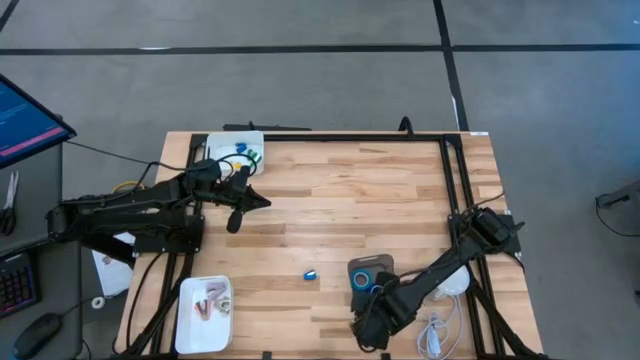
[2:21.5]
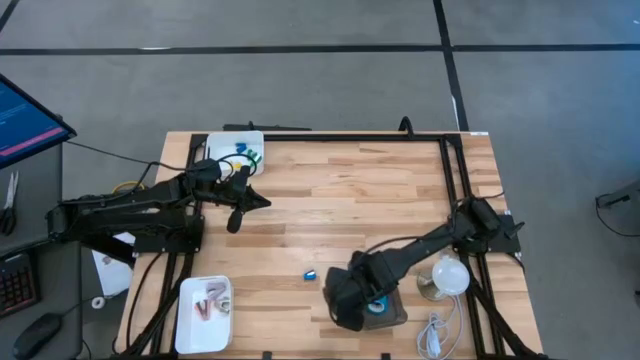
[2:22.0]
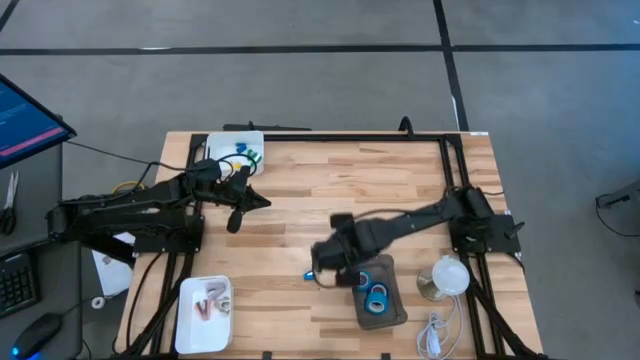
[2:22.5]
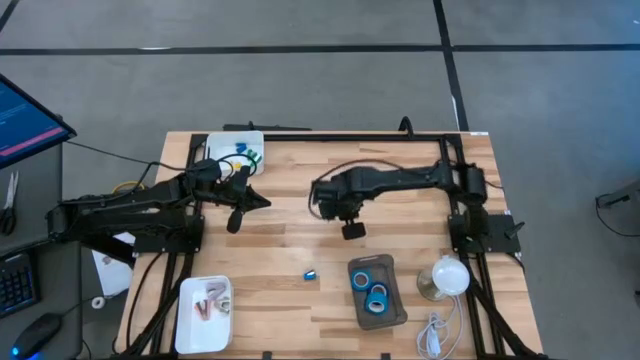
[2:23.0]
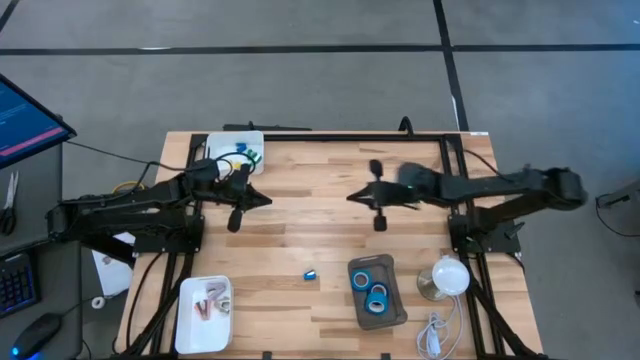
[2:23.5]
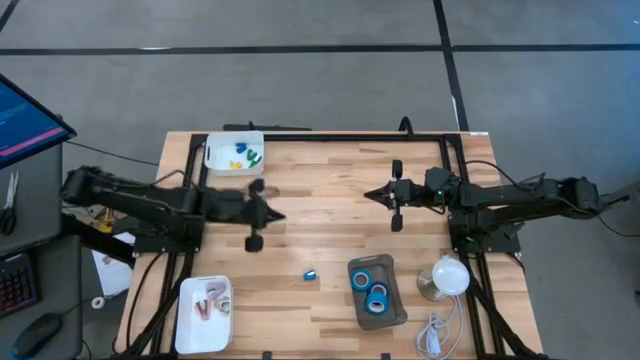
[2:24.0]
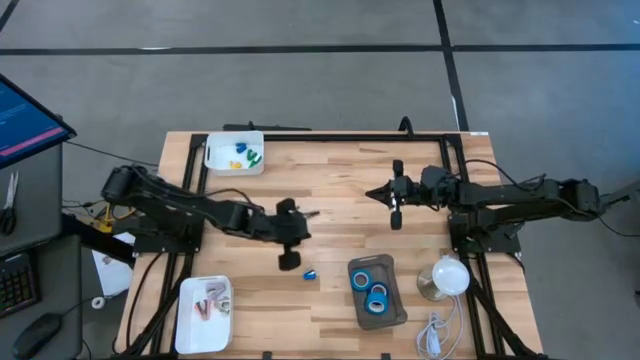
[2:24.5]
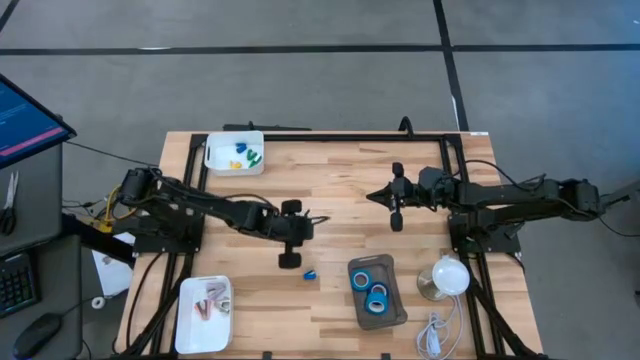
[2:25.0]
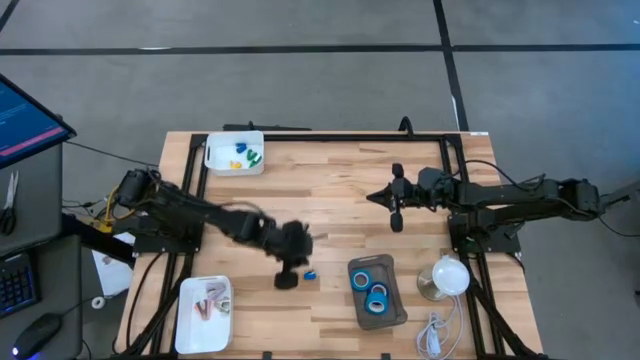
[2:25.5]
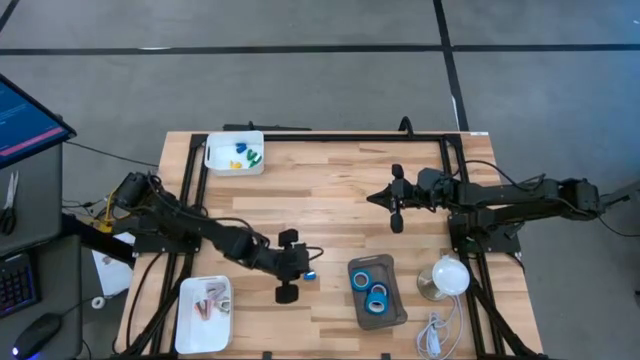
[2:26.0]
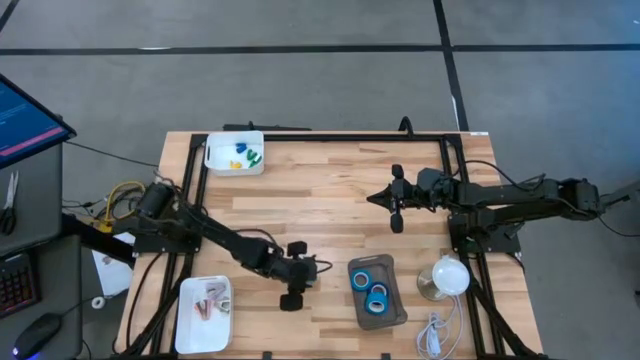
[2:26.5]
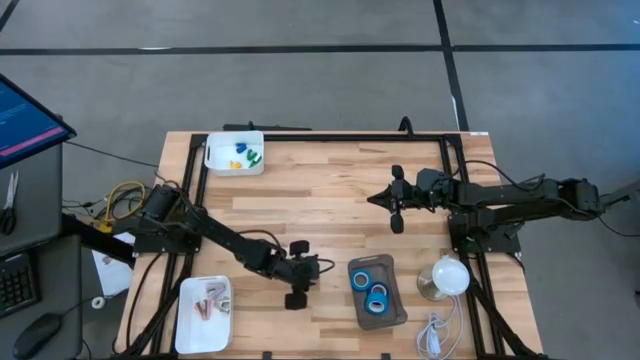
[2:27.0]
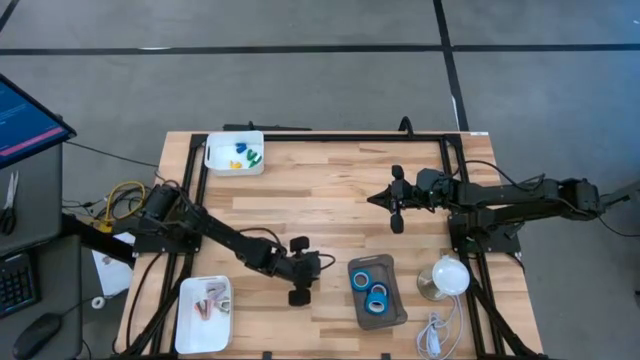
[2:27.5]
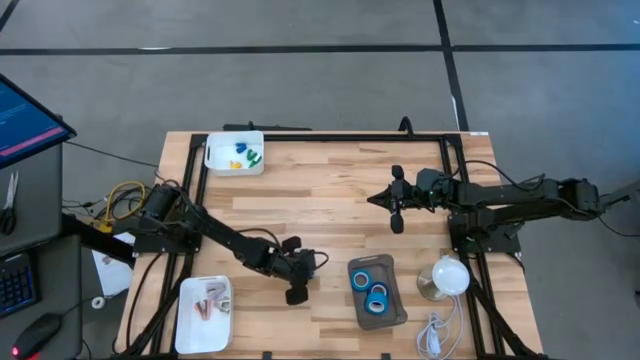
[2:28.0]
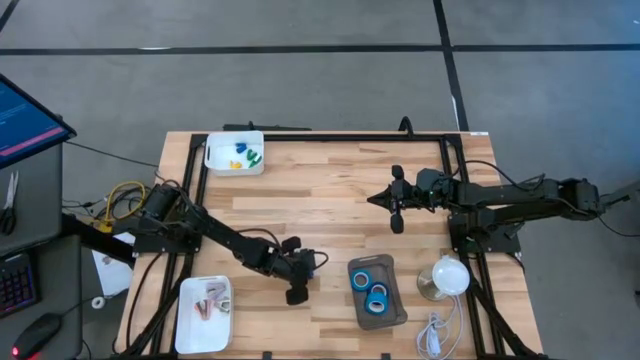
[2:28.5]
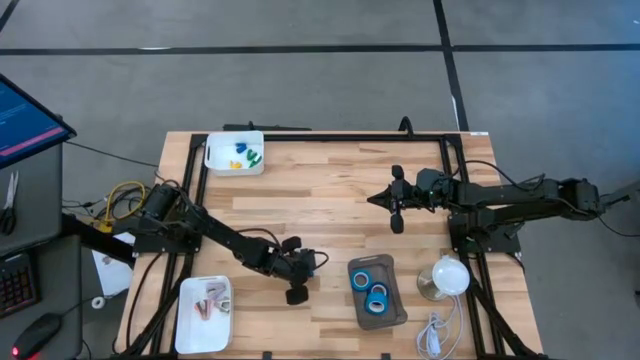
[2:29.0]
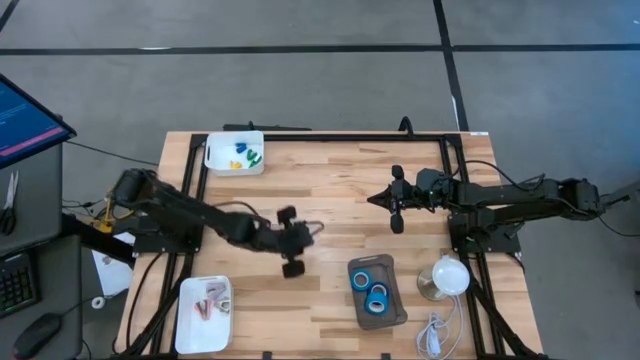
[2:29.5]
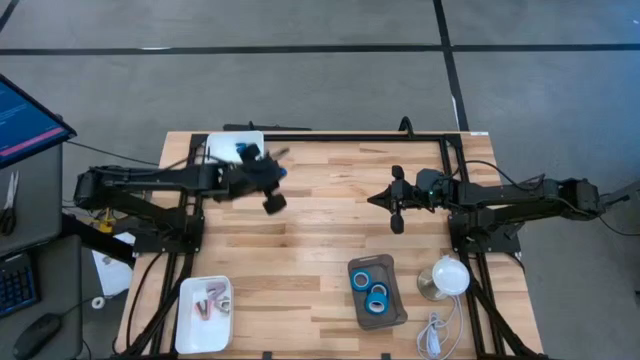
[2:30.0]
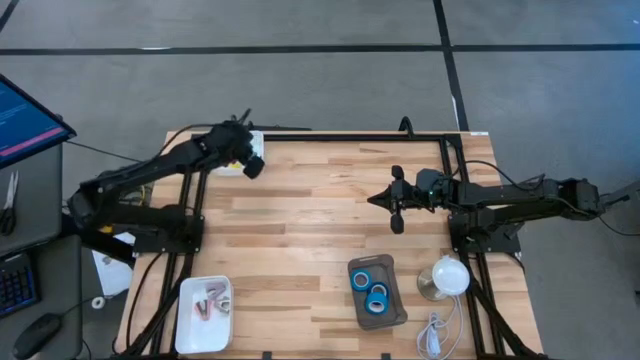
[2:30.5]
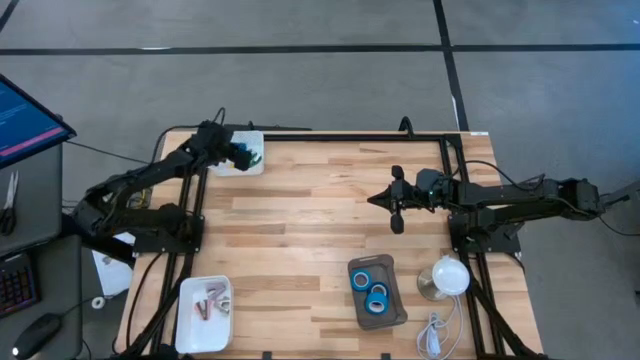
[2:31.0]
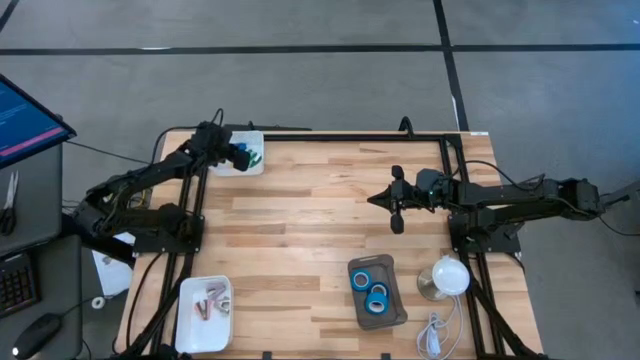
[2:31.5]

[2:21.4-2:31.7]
Task: Pick and place Stapler, Stapler remover, tape
Put the blue stapler into the top white bin

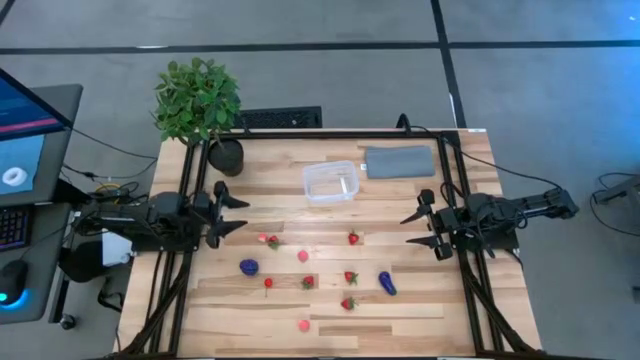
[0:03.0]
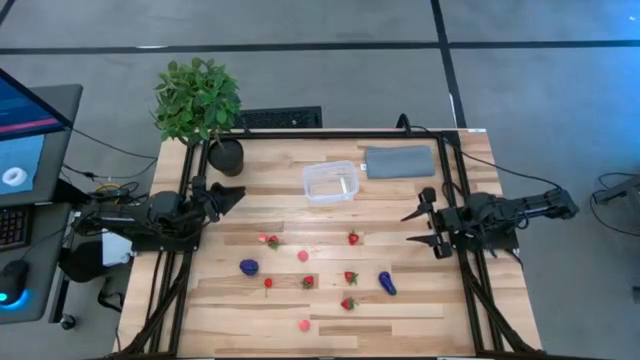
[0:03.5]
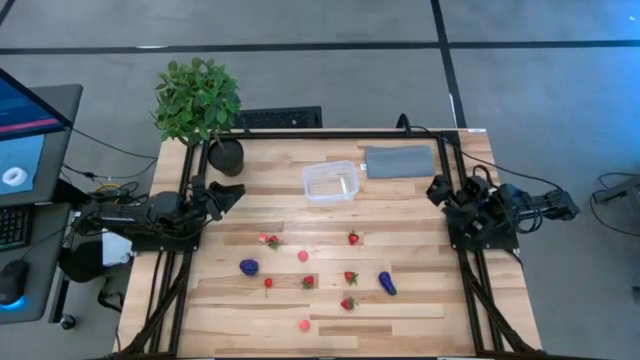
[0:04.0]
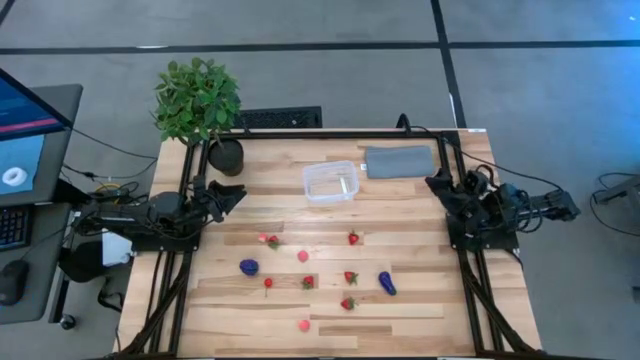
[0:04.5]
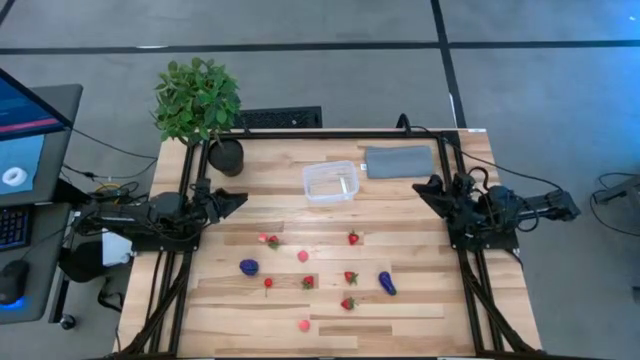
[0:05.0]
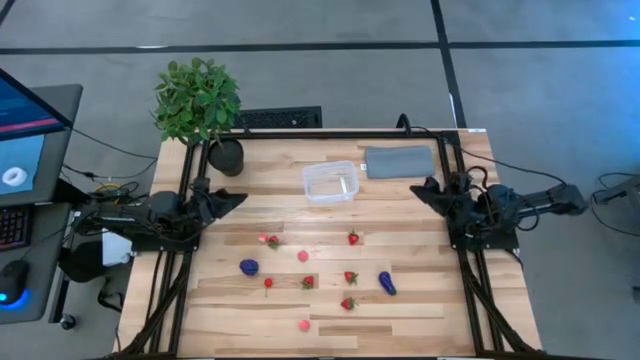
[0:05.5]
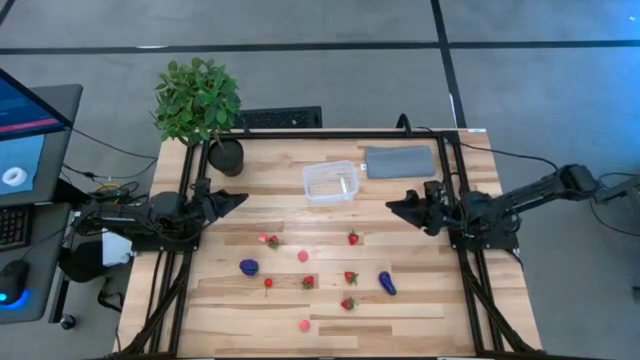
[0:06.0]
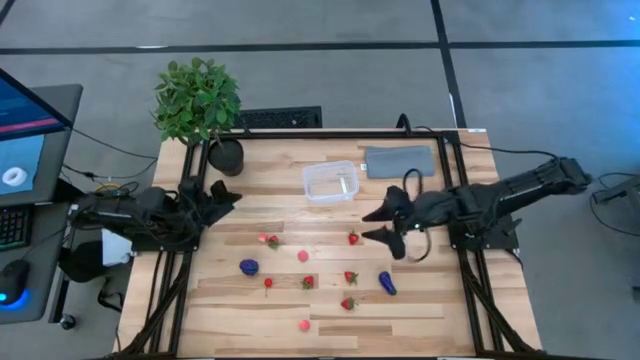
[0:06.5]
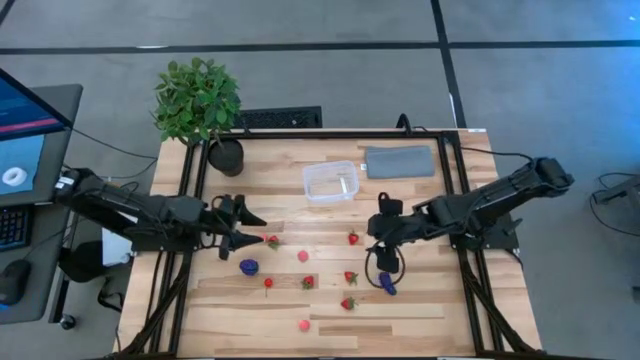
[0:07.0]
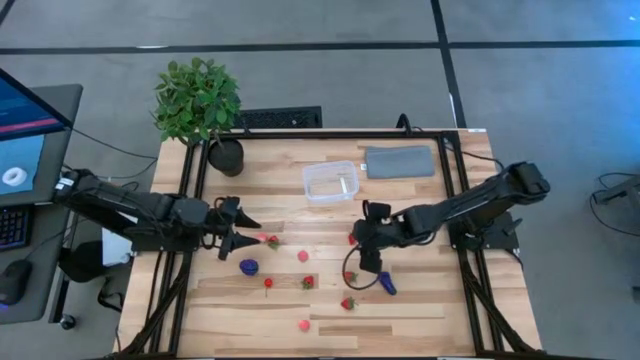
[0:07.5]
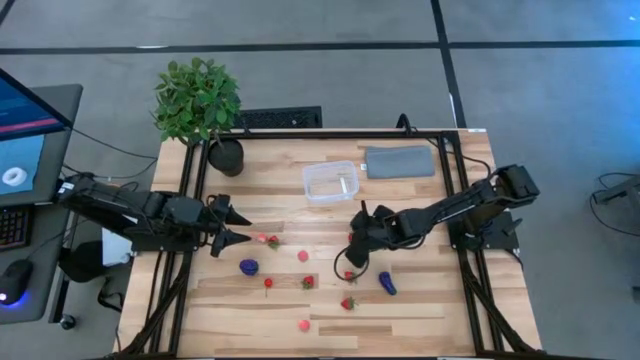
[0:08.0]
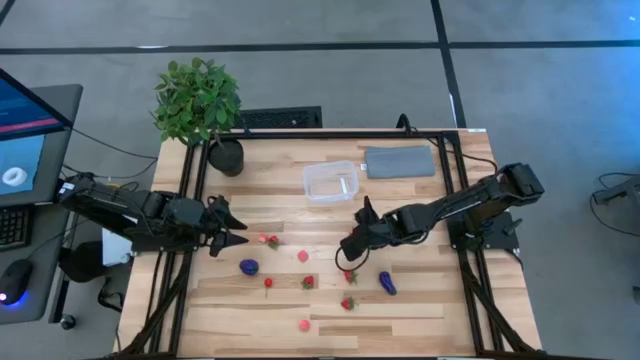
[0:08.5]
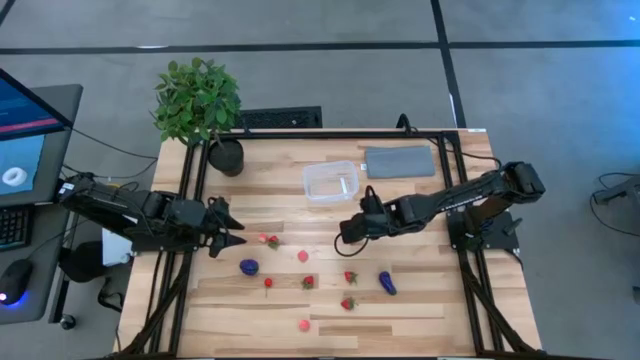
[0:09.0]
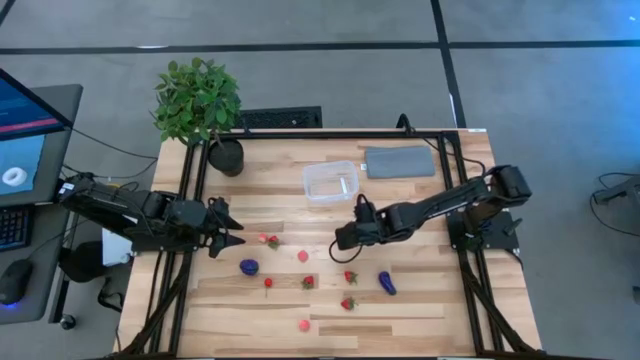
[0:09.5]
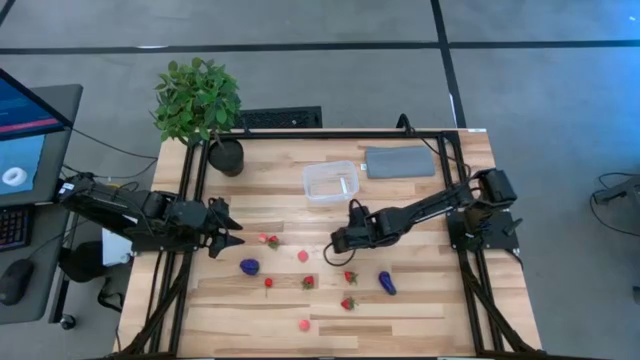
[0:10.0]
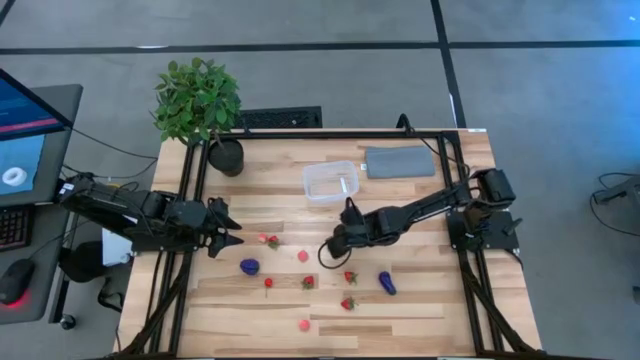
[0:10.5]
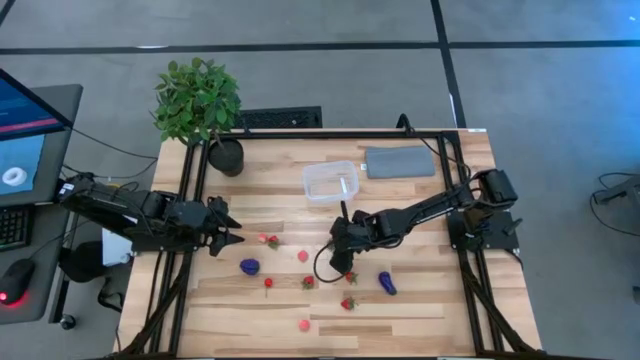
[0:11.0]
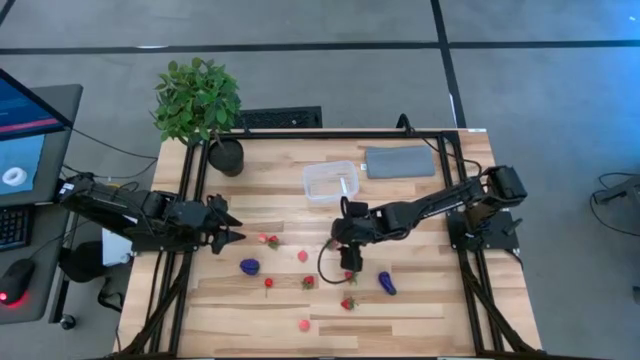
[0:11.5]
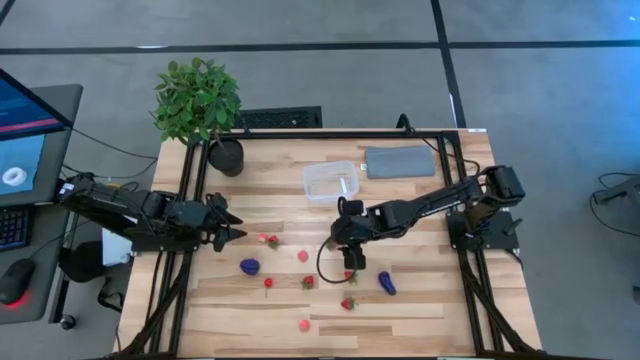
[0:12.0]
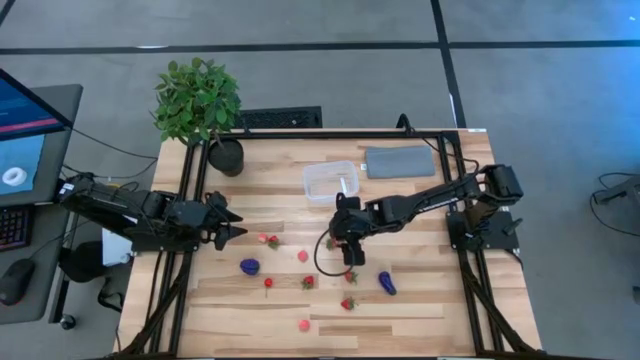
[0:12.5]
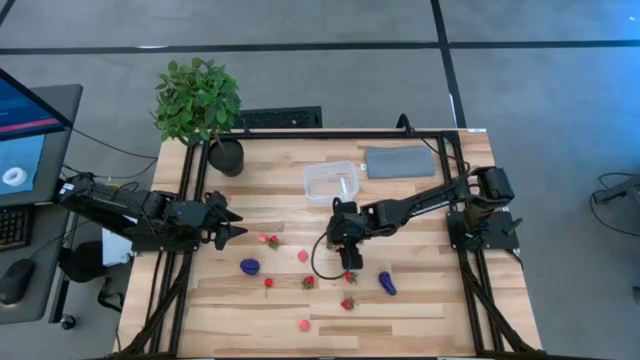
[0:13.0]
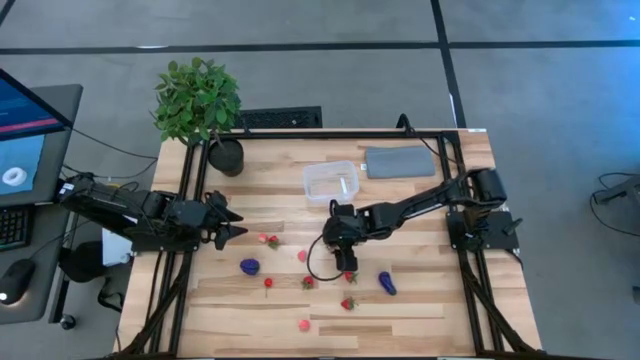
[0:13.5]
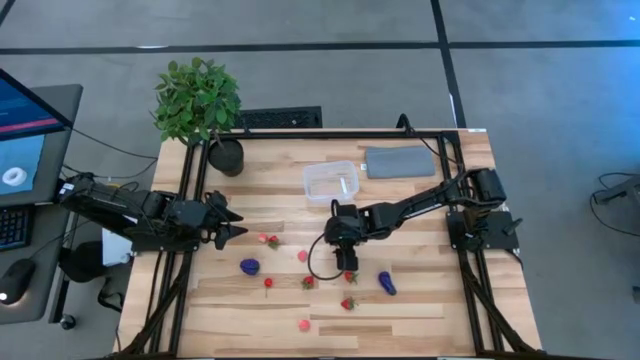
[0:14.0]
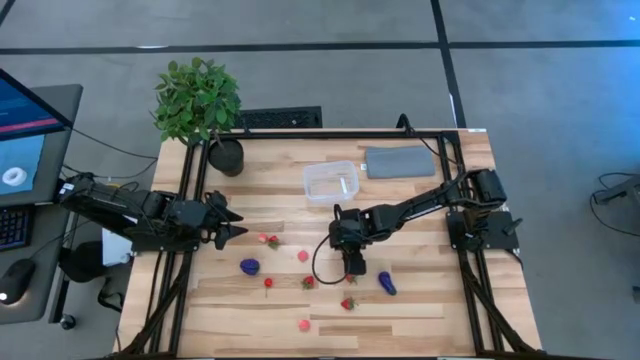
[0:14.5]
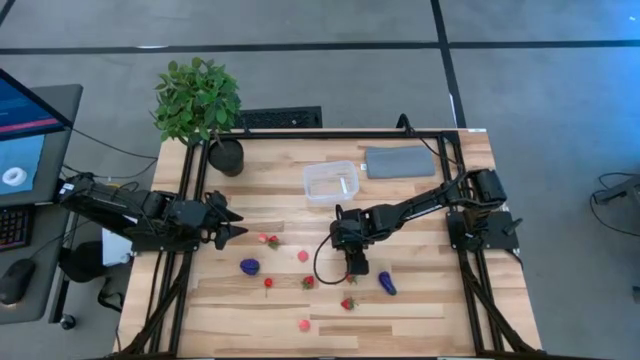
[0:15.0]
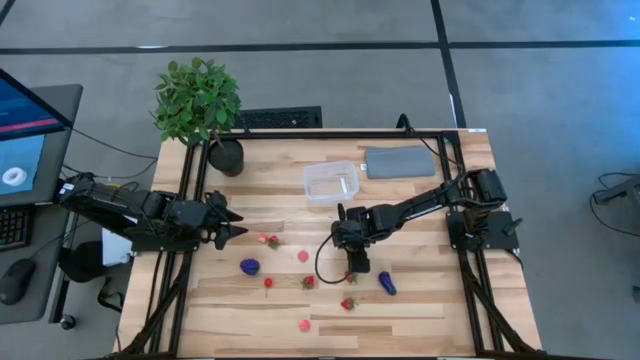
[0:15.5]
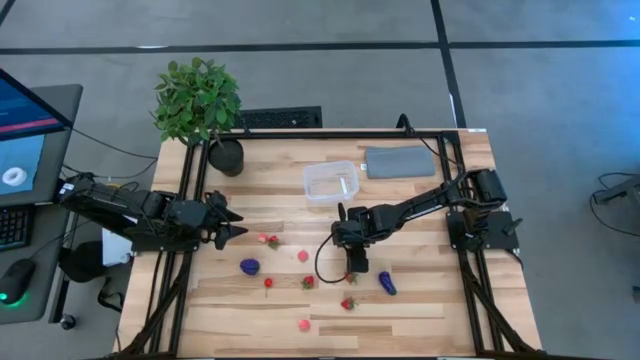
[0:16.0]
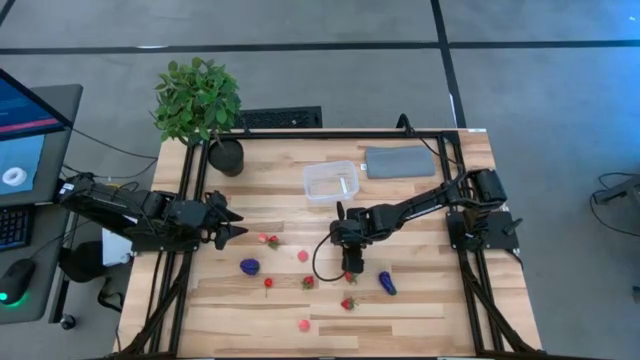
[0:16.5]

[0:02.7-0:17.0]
Task: Pick and placing Produce into tupperware
Put the strawberry into the container
